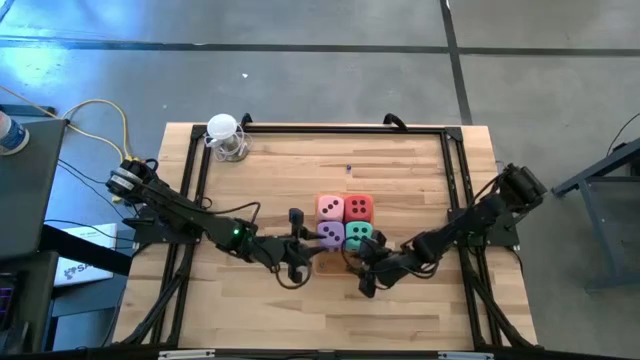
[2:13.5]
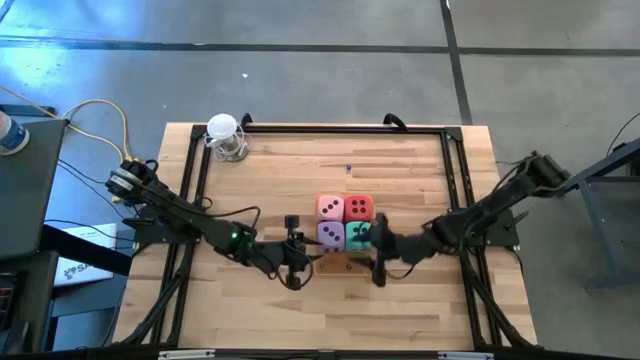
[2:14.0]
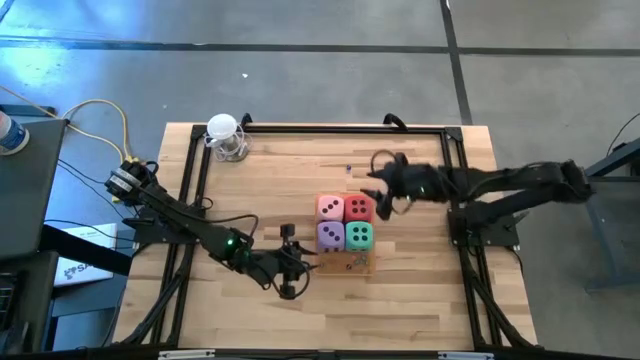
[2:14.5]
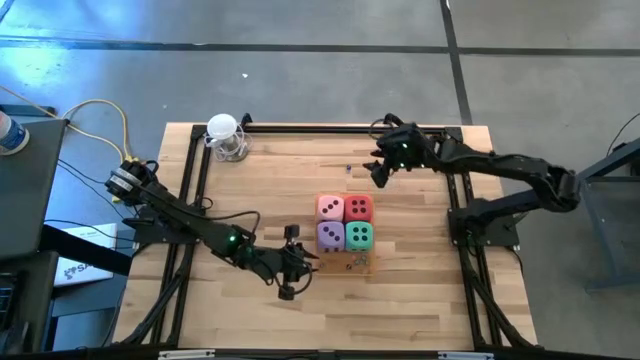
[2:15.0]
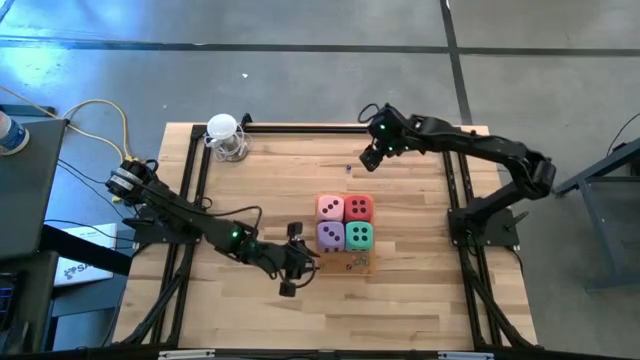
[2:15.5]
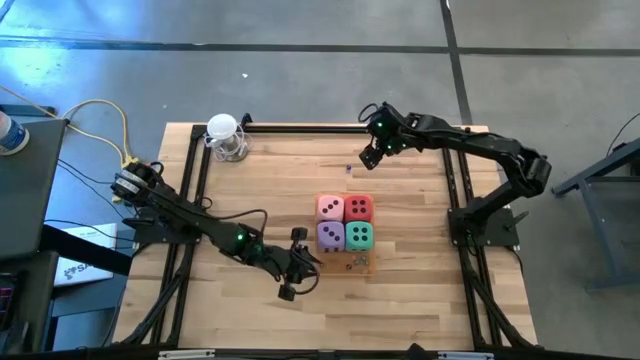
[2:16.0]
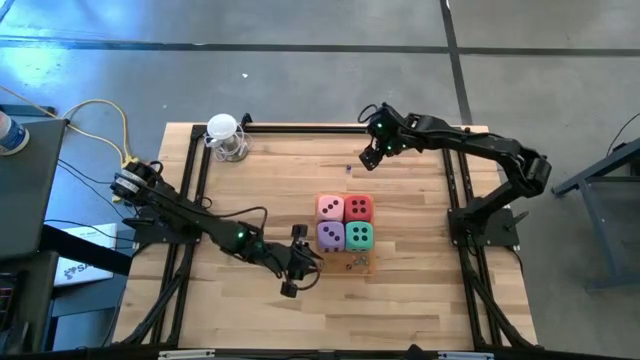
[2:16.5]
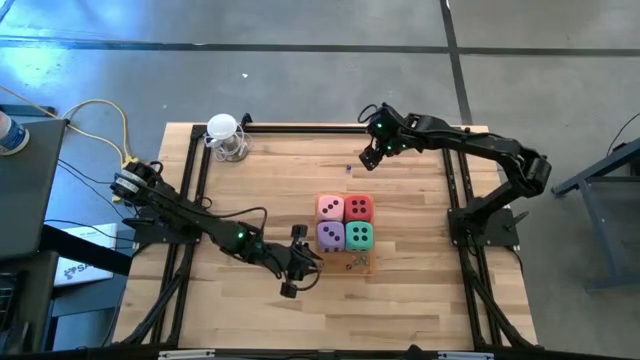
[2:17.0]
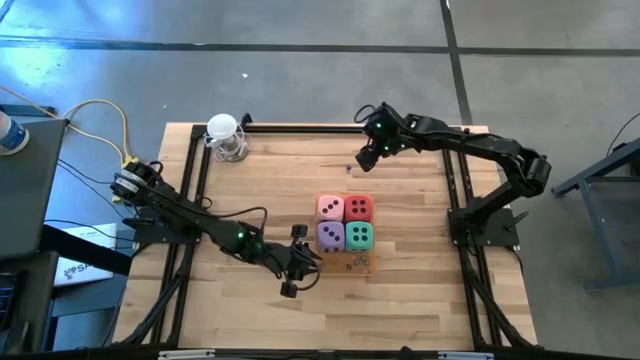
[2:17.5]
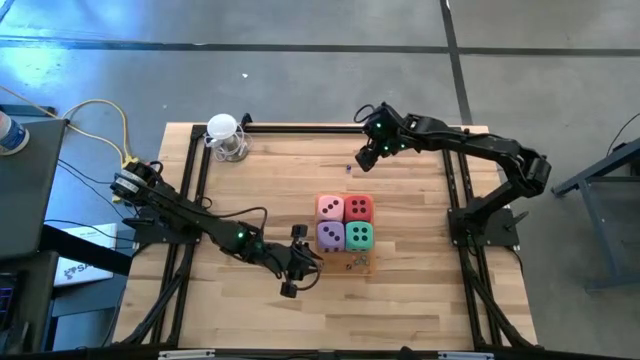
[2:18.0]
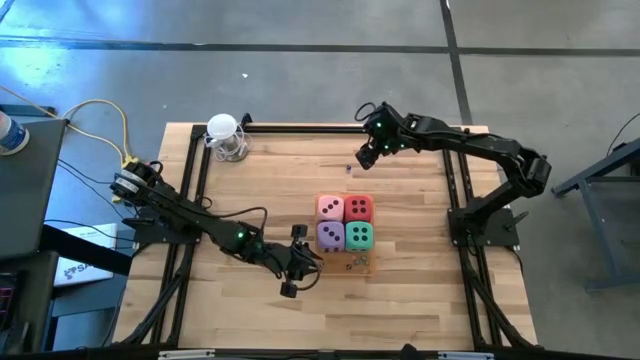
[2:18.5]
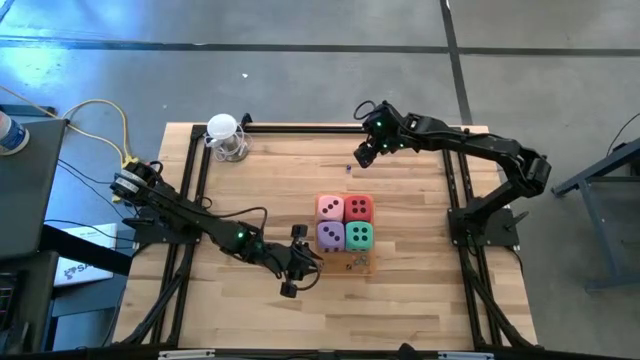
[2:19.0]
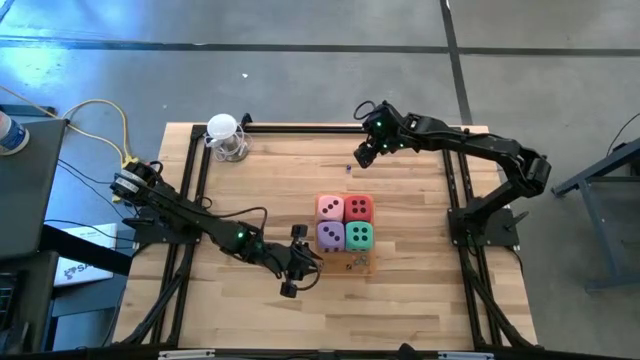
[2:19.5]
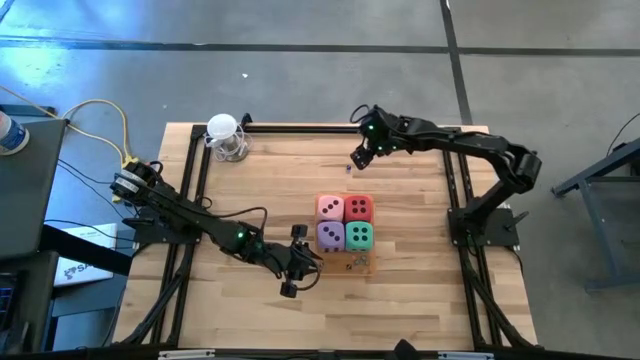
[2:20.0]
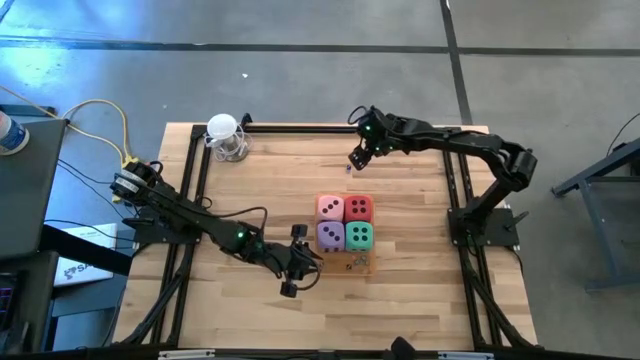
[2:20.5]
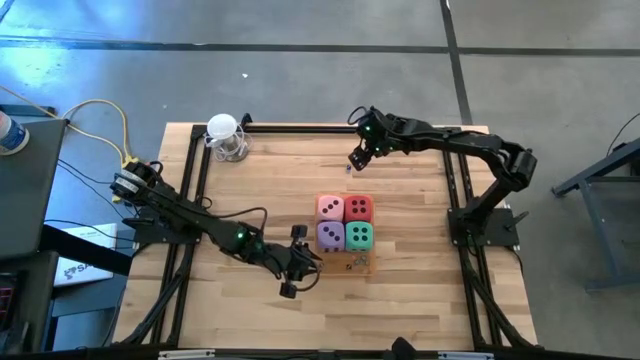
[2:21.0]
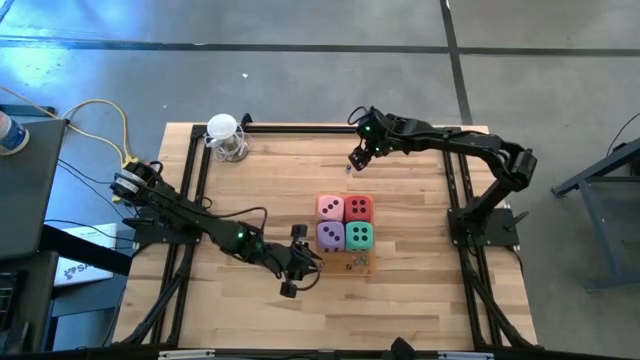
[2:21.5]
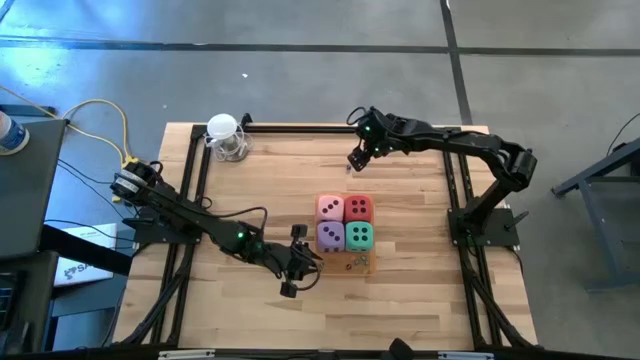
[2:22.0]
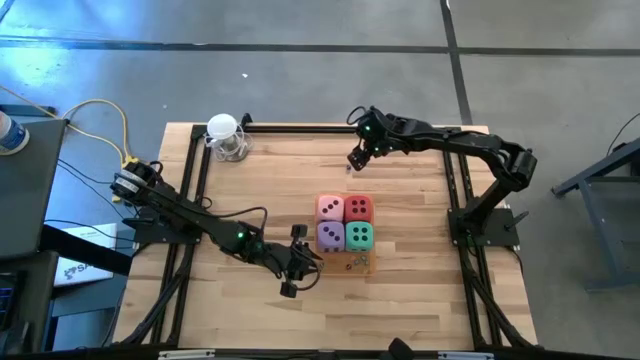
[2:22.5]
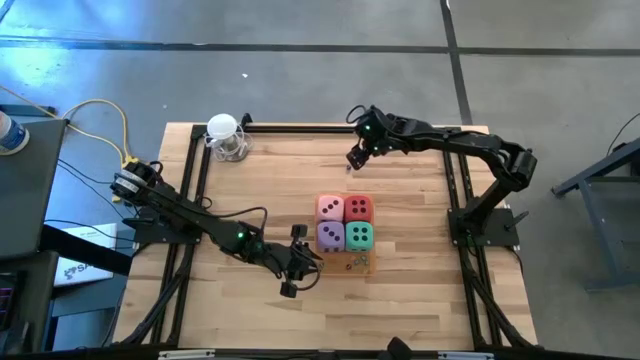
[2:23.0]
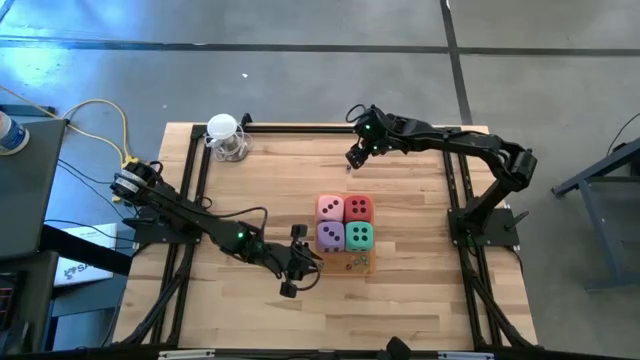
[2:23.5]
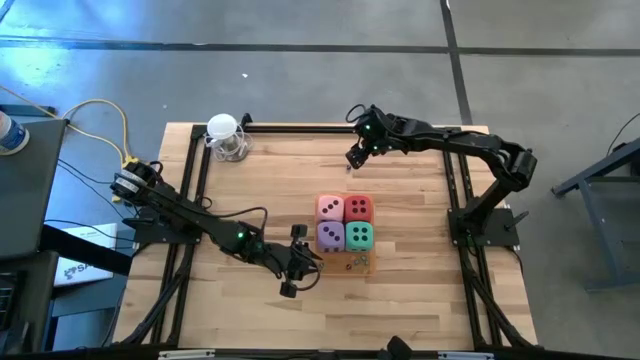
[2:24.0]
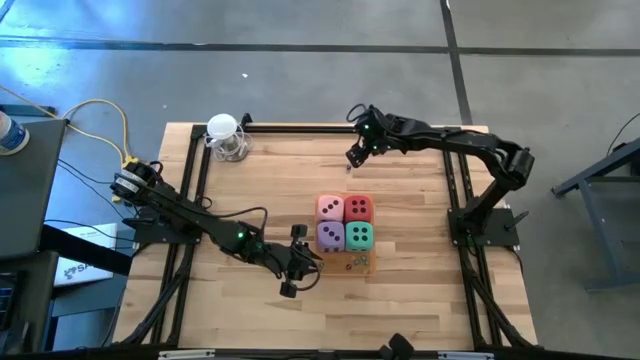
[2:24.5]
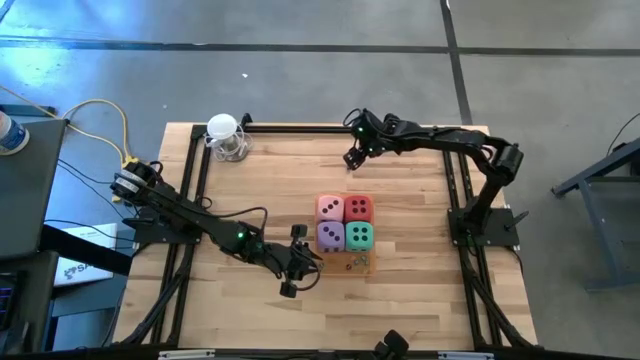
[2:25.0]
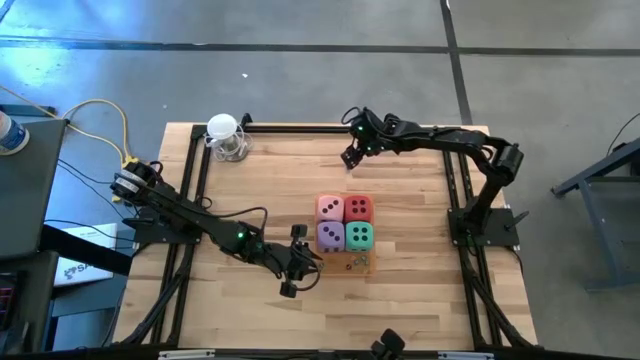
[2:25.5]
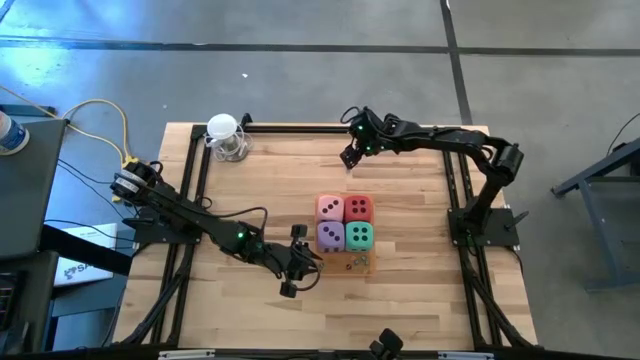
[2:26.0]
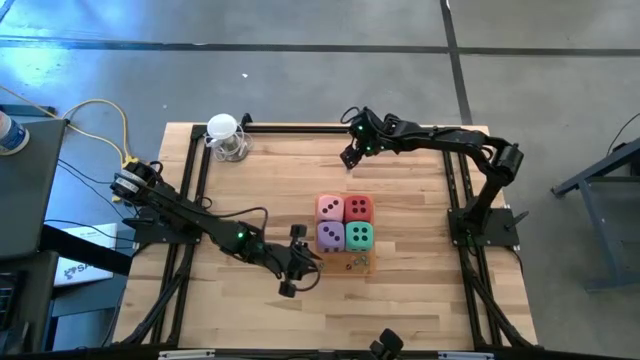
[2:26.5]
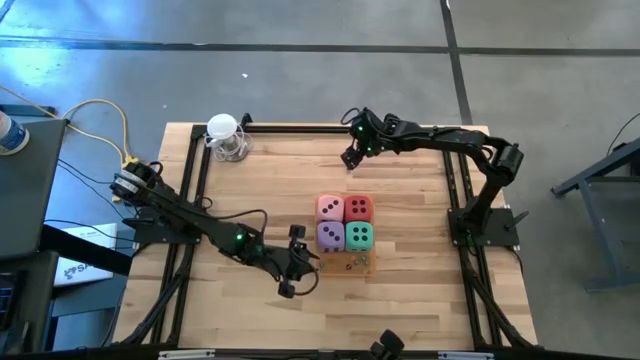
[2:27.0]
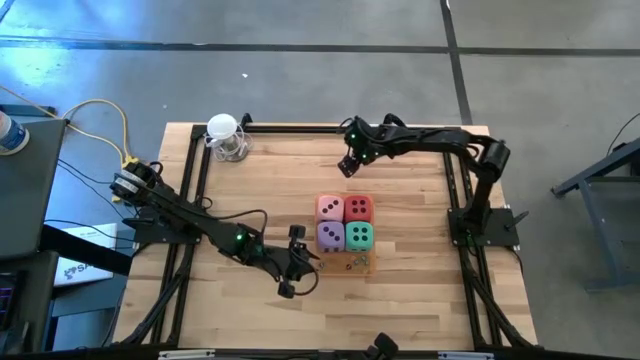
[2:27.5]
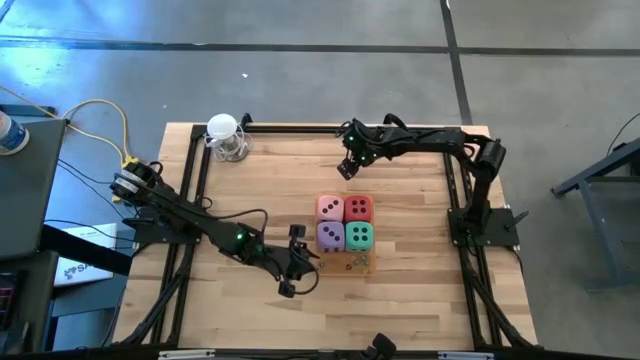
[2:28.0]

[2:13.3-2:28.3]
Task: Pick & Place Dice
Put the small dark blue die into the orange bin

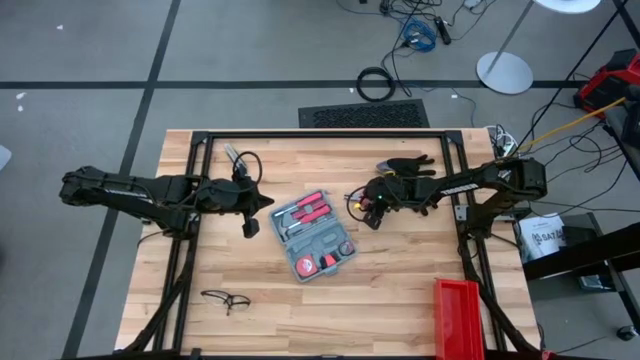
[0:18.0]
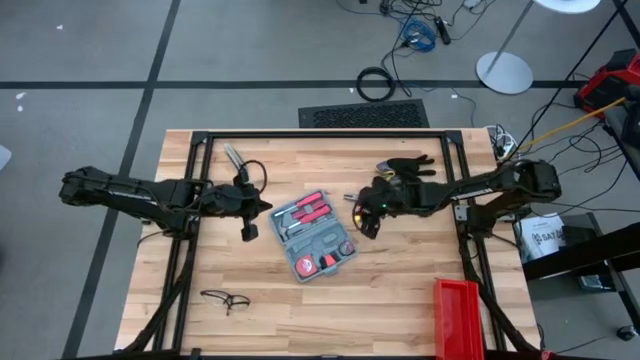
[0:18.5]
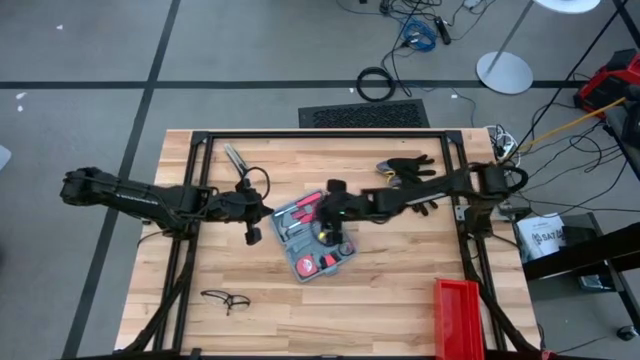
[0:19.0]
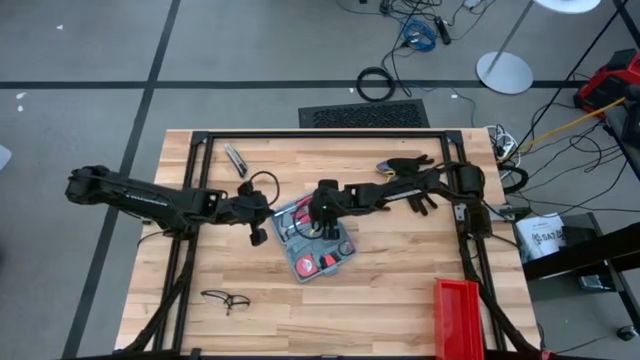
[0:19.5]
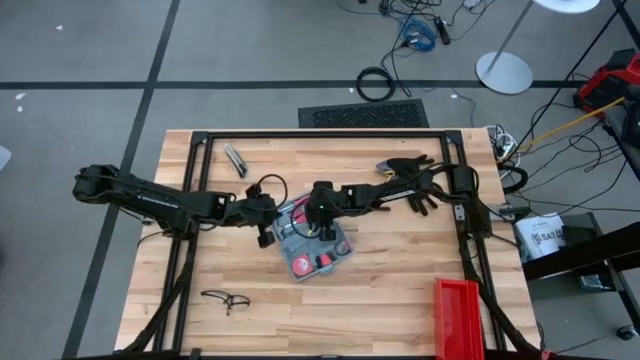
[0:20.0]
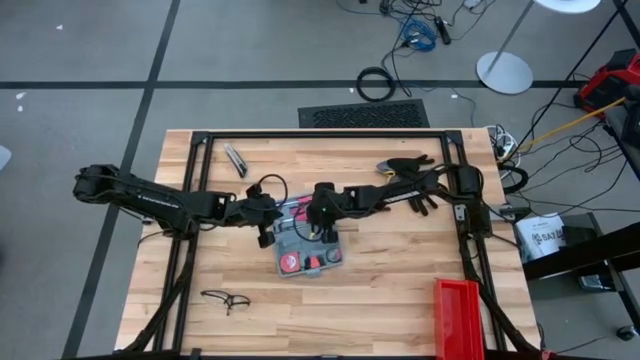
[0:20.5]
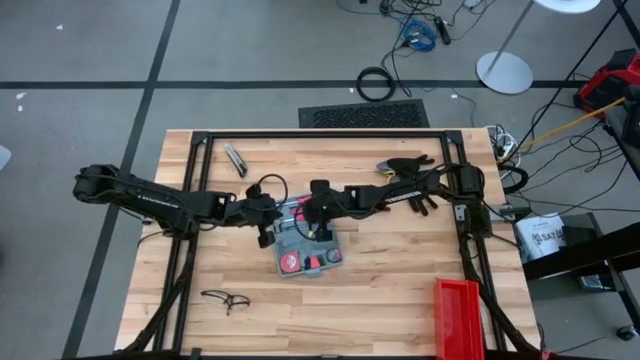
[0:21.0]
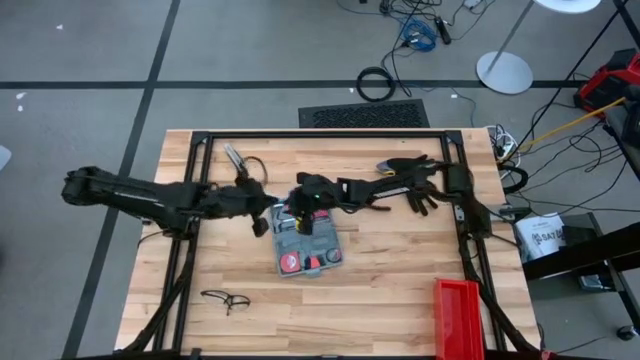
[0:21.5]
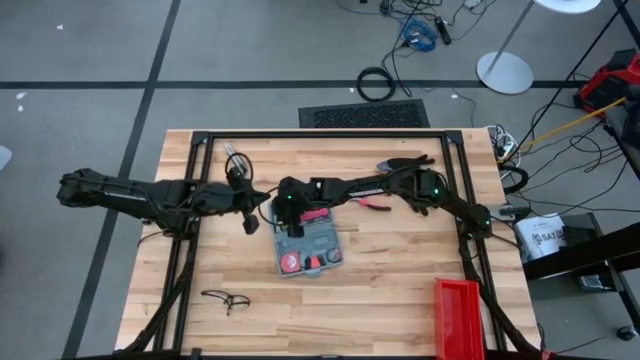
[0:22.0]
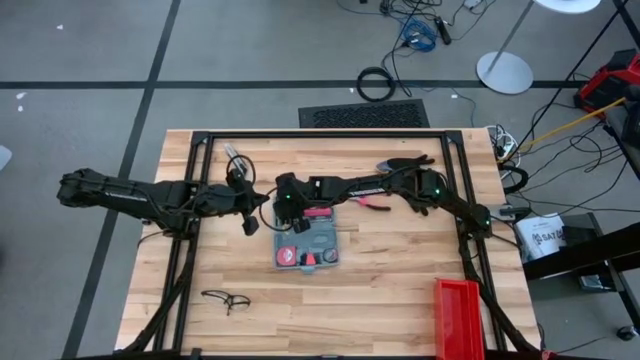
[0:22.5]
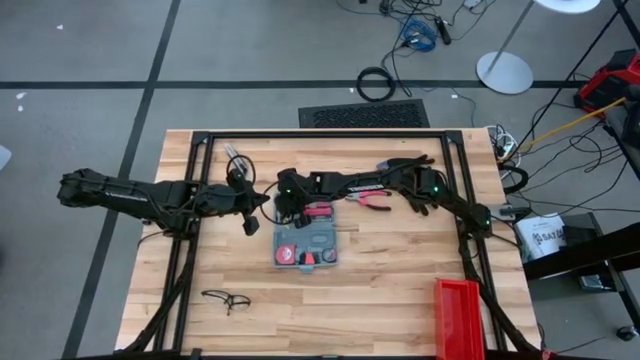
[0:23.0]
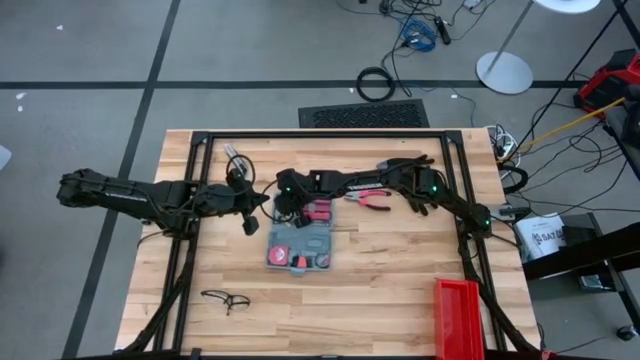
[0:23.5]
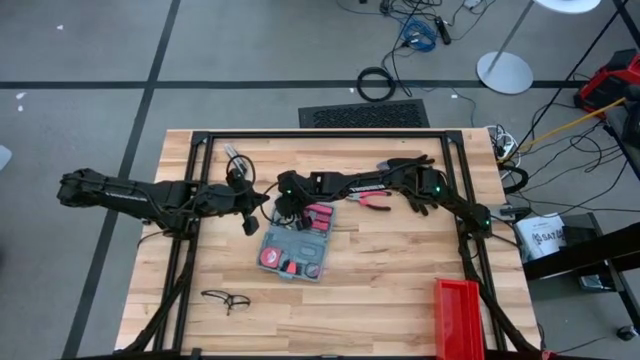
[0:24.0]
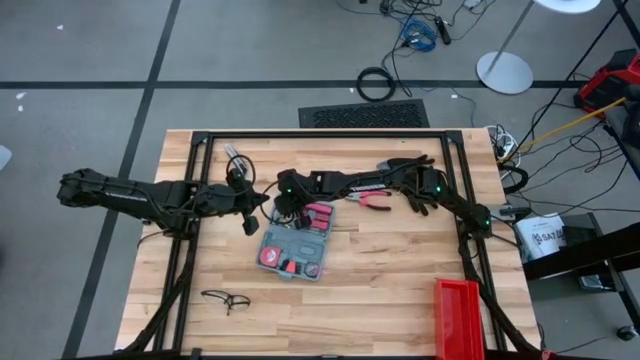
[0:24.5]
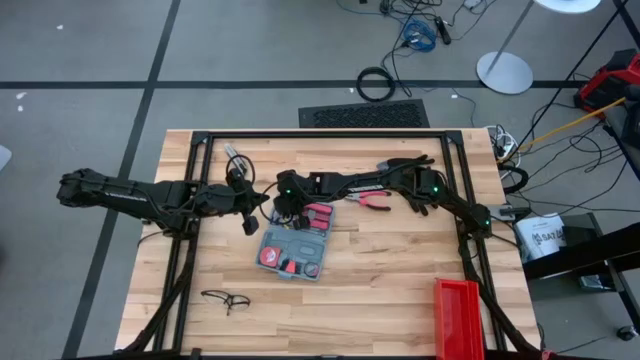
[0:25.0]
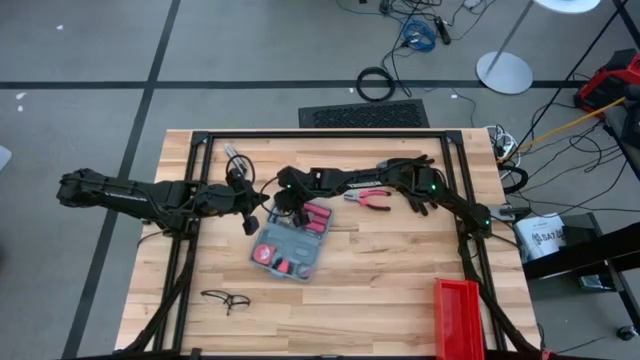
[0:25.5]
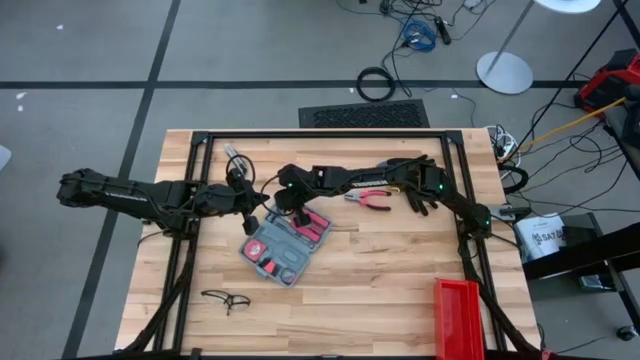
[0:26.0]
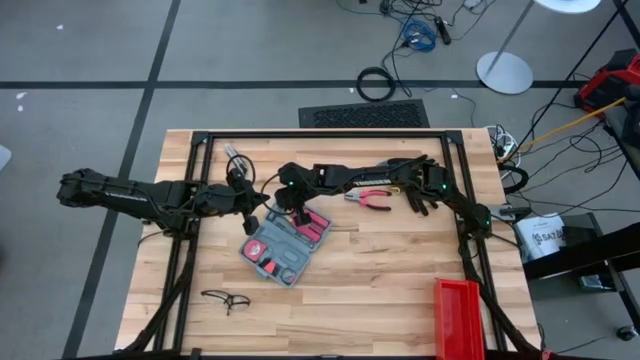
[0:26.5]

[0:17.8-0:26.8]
Task: prefit tool cases
Remove the pink hammer from the gray prefit tool case
